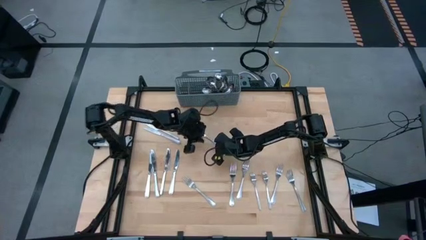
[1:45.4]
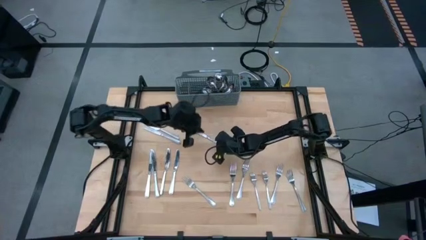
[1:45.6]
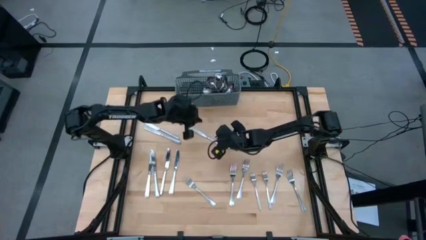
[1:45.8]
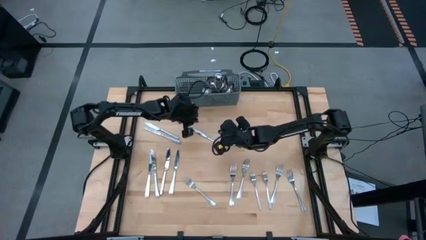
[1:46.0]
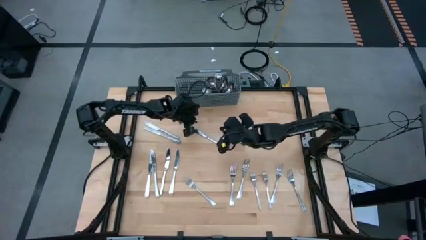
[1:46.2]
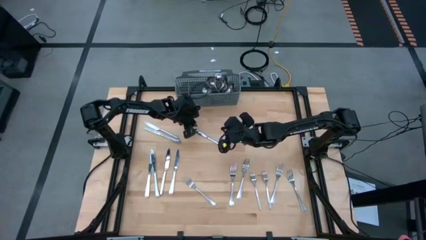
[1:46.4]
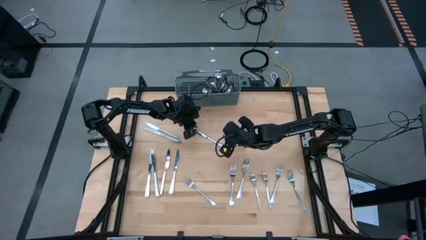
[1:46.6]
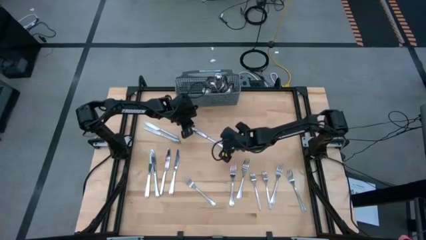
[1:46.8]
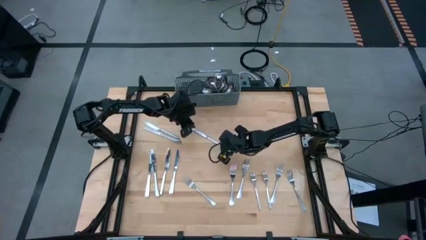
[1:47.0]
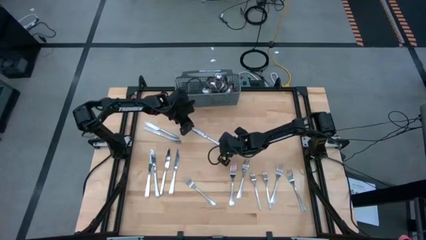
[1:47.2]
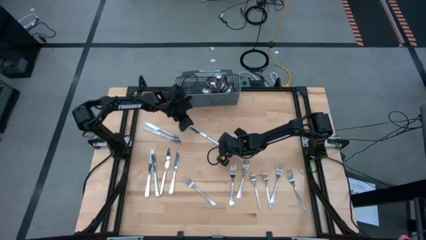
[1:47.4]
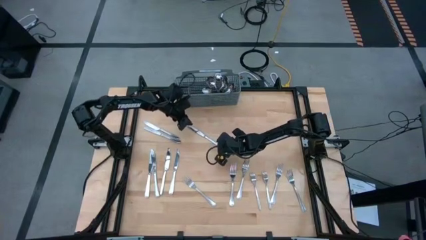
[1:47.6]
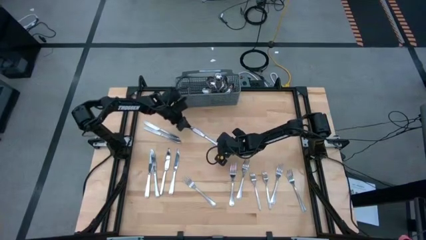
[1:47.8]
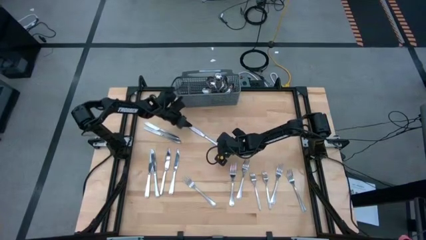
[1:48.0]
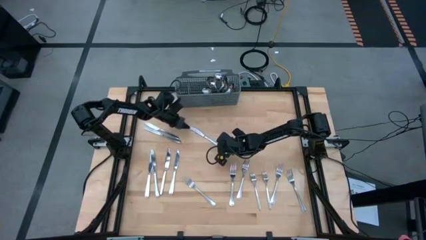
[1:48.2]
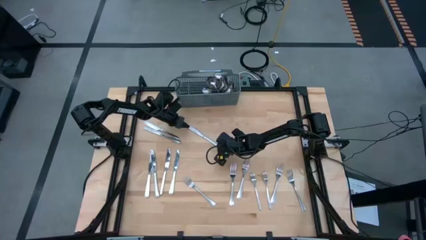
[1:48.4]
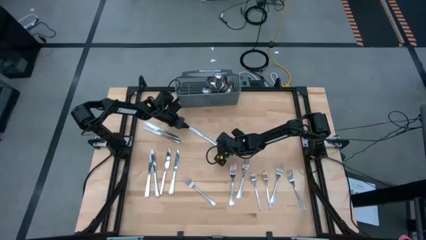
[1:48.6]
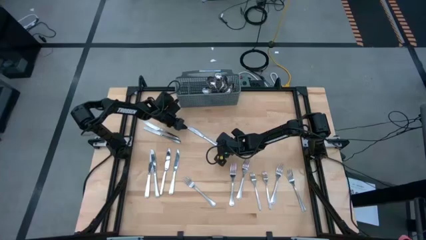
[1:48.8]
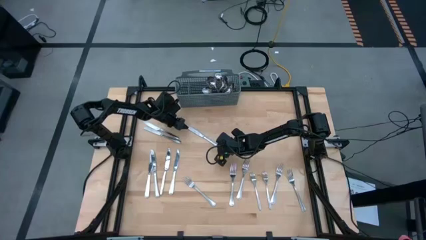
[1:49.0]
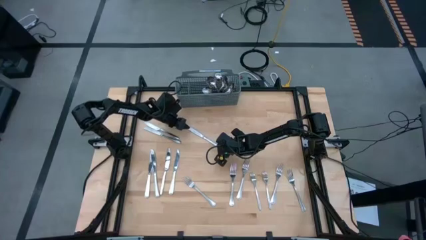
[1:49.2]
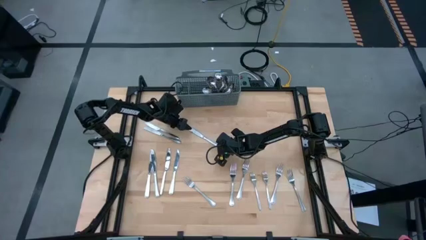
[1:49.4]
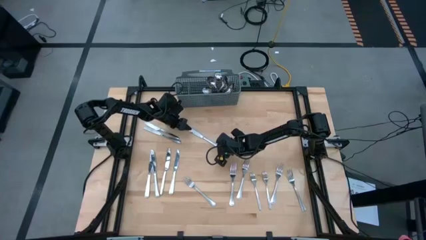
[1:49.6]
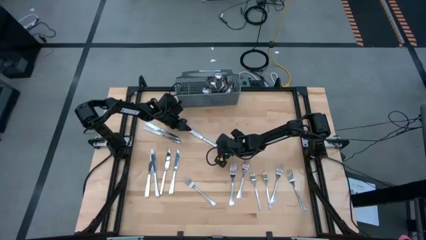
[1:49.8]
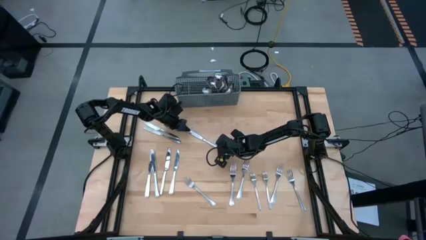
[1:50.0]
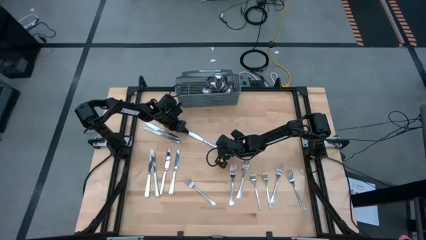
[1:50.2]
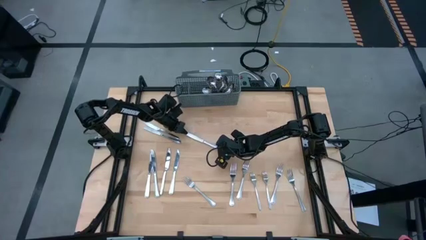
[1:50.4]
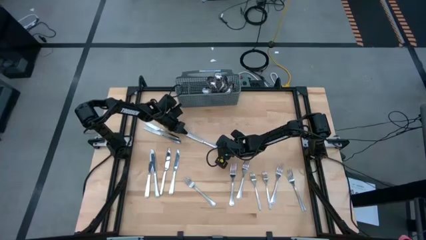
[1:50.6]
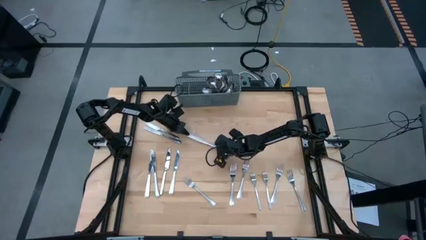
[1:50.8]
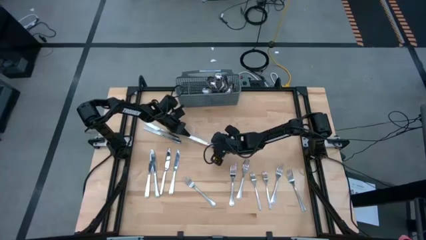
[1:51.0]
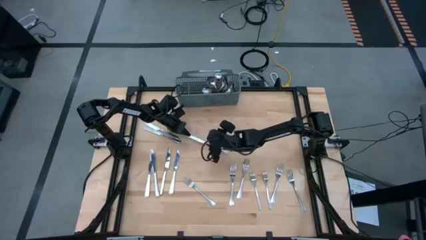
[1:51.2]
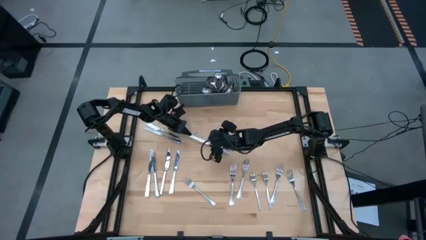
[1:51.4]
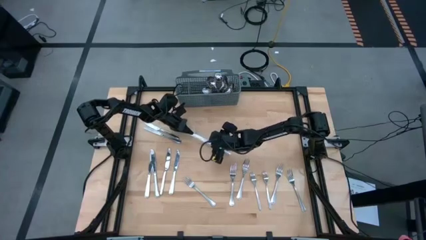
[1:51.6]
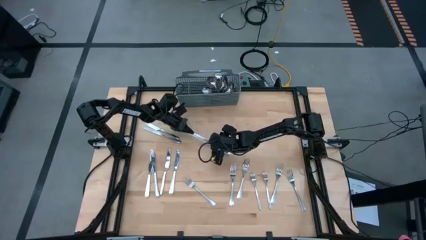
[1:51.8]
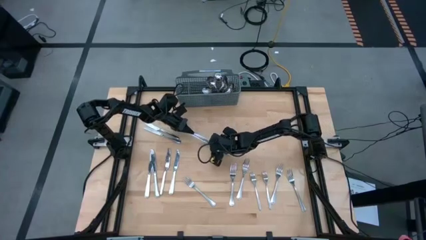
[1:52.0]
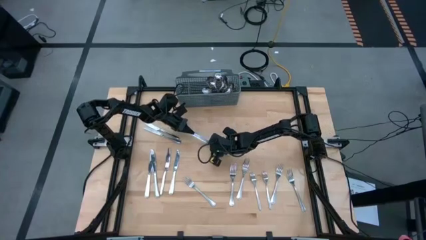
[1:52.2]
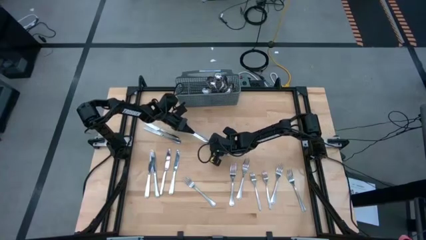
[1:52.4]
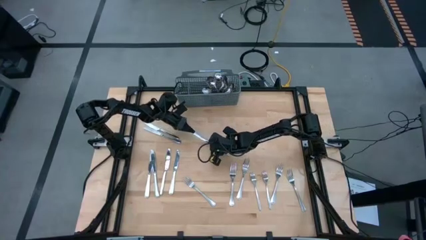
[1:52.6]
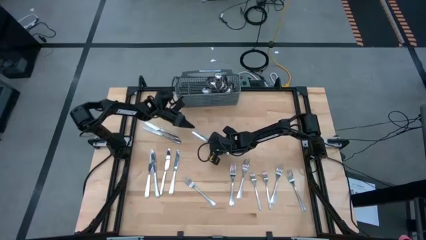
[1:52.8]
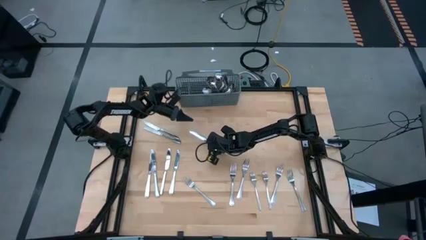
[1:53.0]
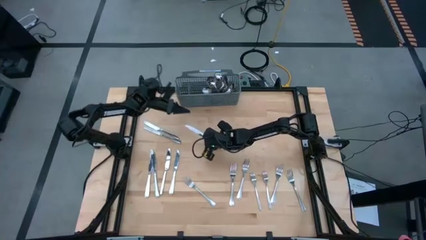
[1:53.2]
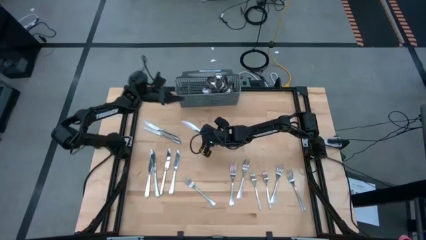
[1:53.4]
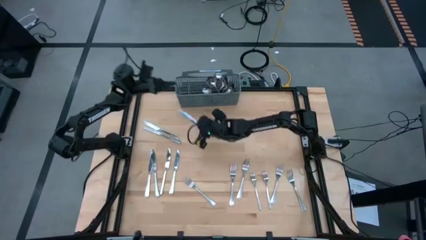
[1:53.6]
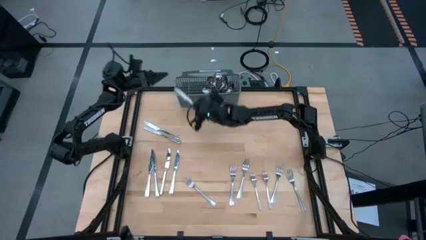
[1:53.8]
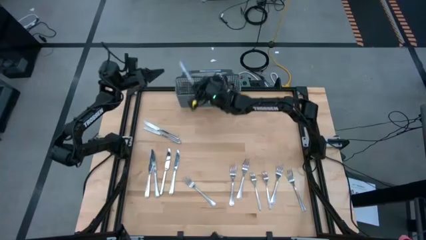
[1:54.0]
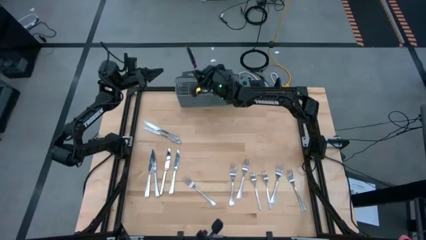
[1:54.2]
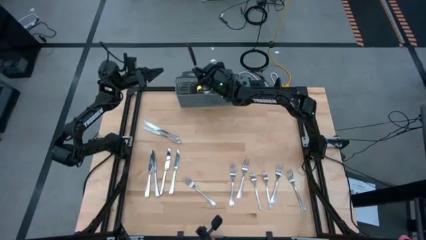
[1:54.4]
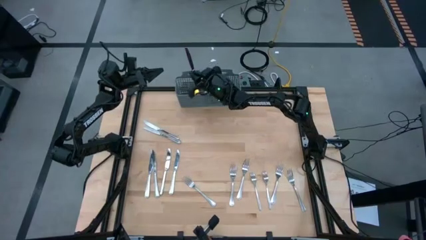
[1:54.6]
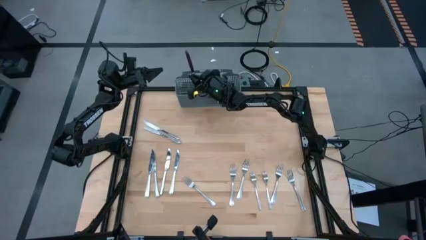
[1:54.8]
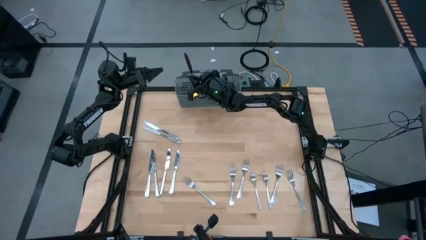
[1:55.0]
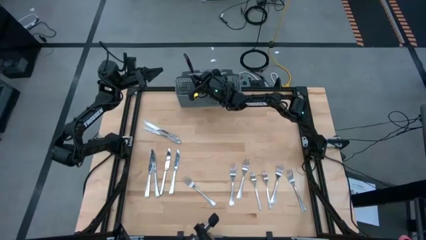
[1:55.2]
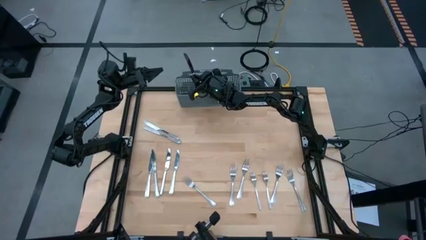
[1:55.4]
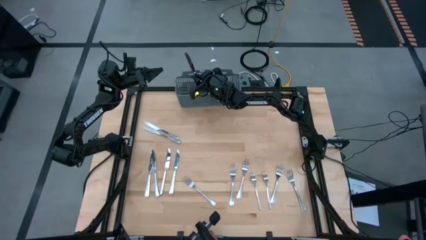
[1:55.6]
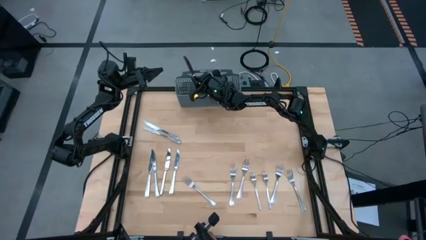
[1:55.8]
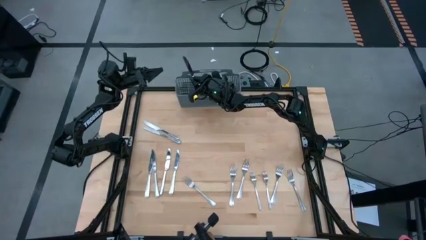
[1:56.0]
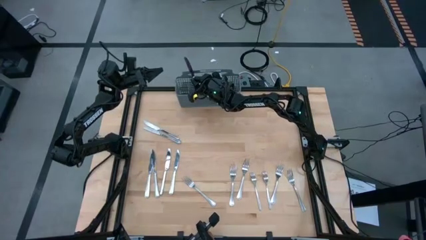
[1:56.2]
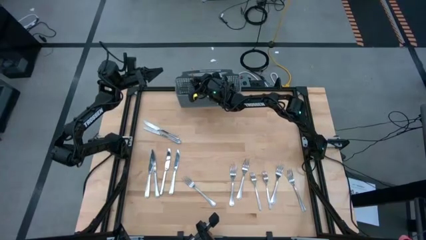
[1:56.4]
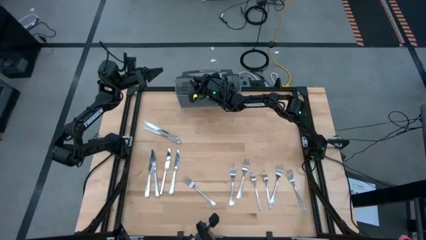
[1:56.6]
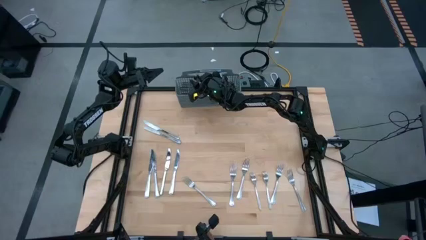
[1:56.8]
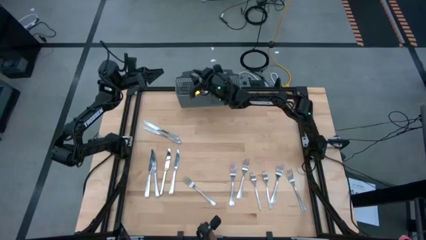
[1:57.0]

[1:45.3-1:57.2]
Task: Sort silverware
Put the silver knife into the gray utensil holder

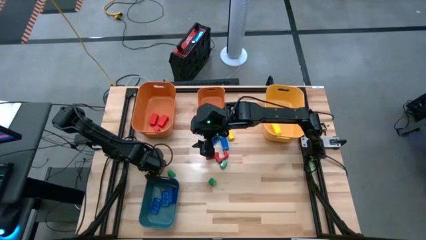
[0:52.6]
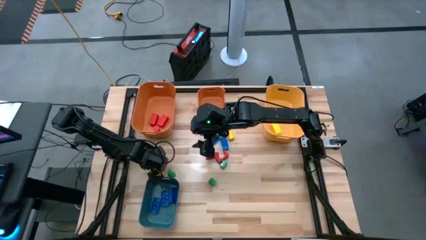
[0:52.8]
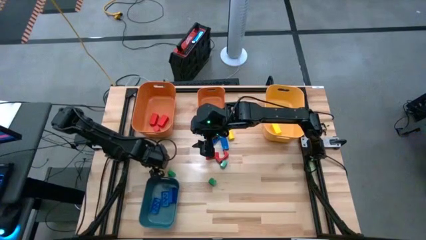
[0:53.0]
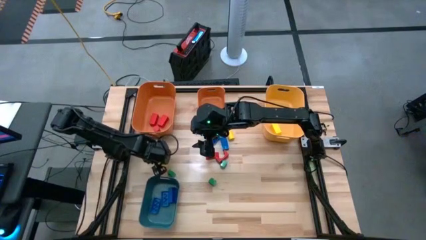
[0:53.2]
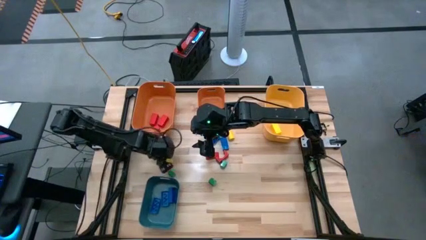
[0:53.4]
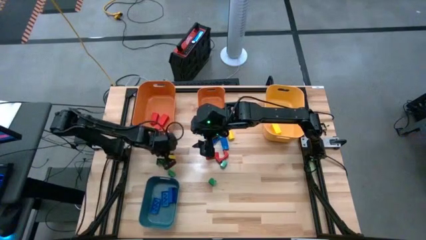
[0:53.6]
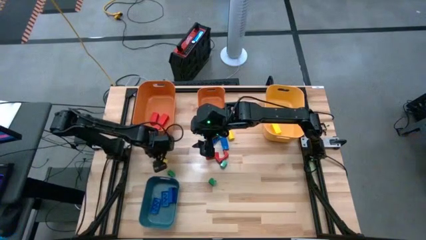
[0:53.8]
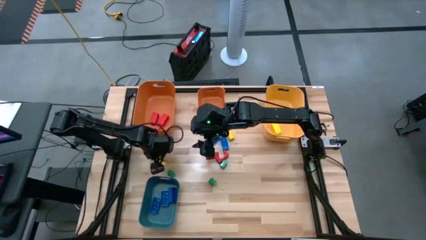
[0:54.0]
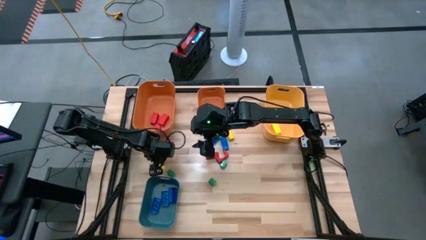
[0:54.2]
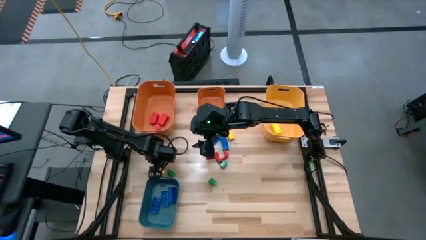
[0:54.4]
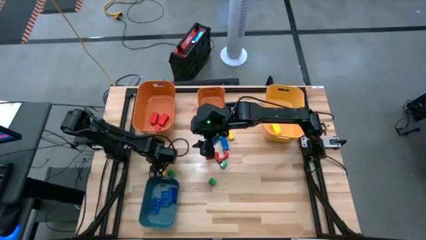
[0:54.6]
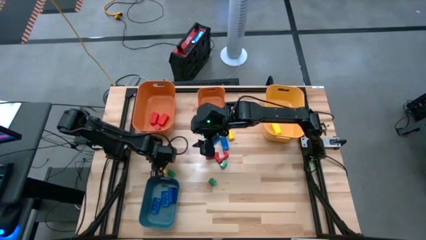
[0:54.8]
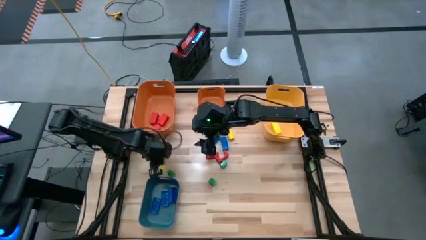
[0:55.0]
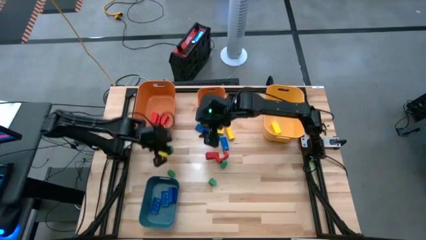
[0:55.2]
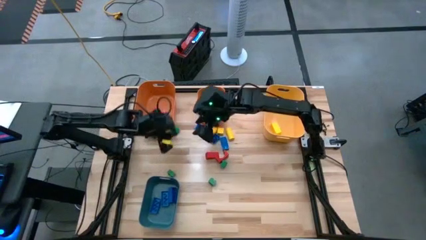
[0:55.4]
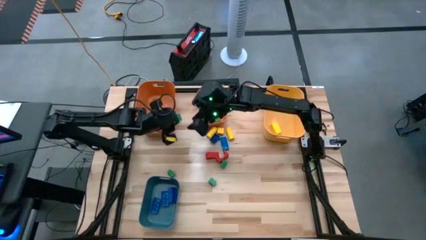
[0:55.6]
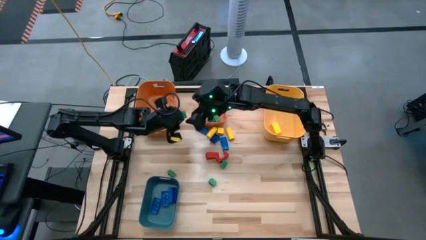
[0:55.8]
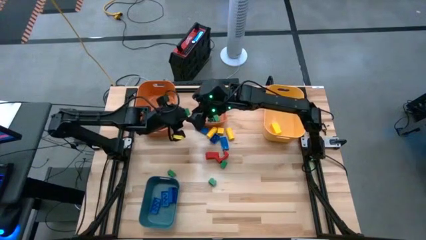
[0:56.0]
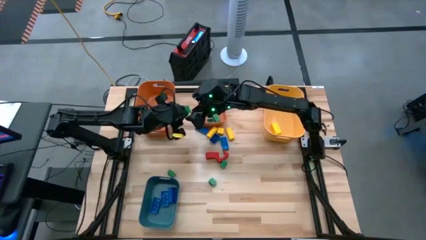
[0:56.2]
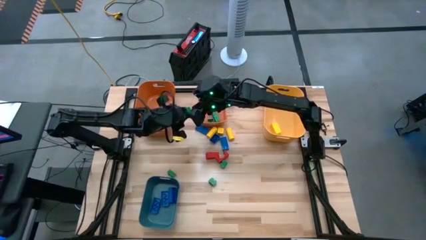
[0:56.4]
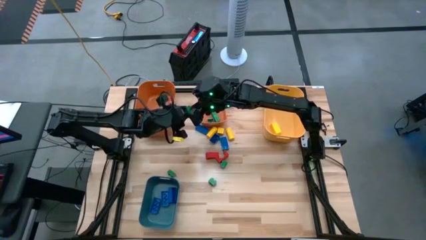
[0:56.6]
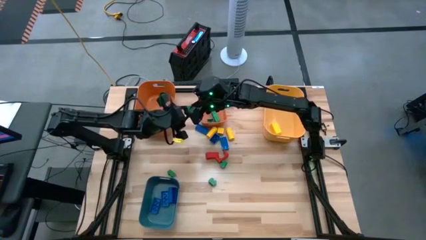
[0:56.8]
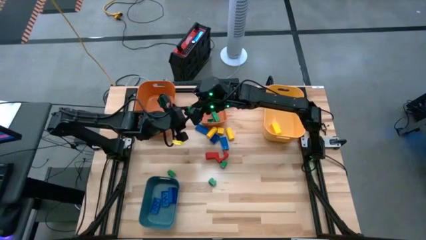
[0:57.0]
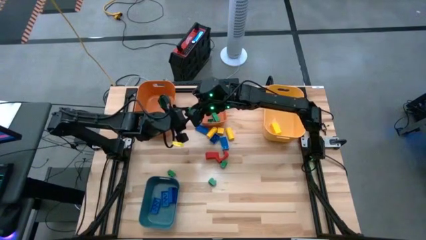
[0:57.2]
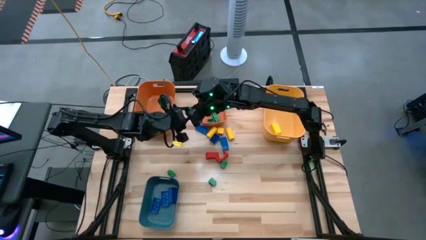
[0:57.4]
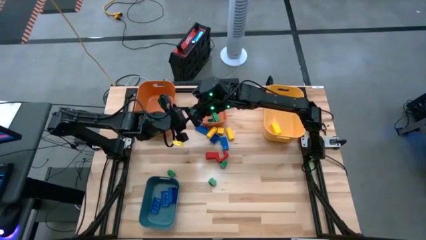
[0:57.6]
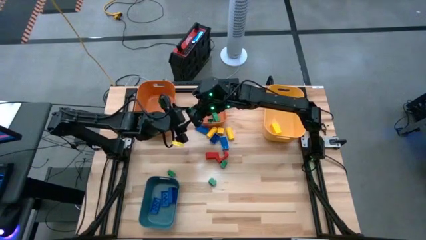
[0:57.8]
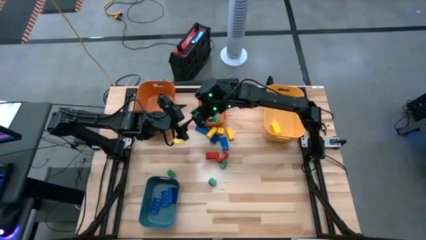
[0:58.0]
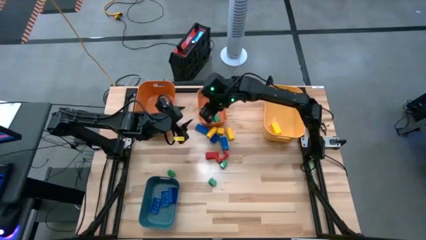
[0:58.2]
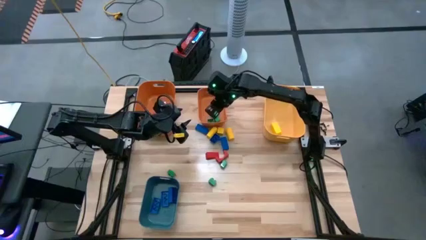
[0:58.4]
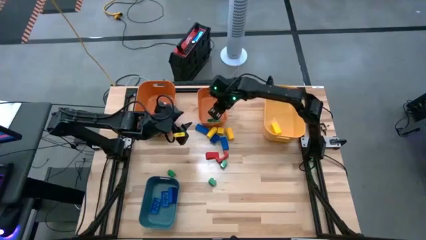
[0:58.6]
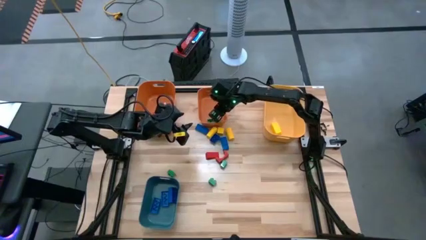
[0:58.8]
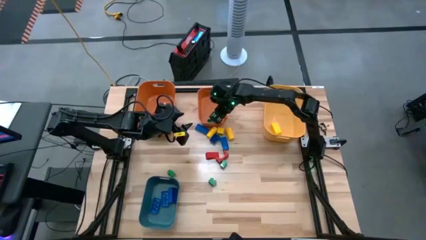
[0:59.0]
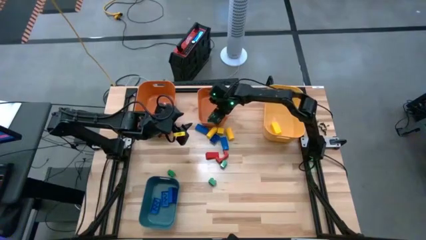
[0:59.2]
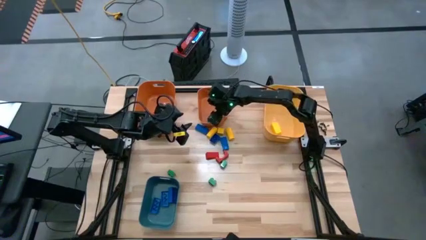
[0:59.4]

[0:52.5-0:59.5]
Task: Sort blocks
Put the green game piece into the right orange bin
